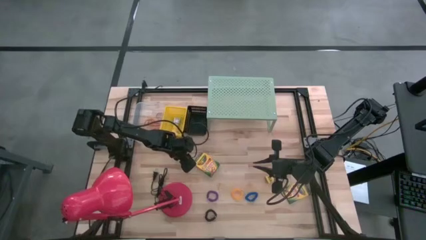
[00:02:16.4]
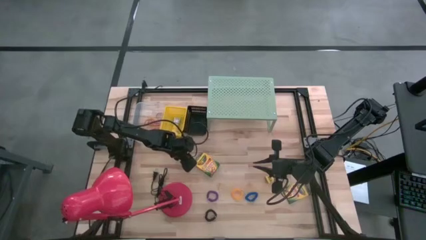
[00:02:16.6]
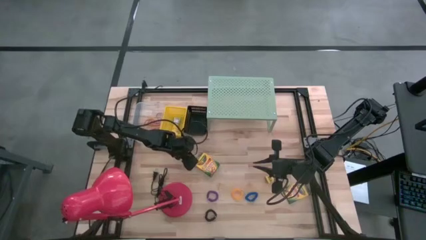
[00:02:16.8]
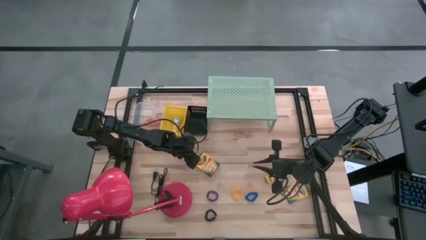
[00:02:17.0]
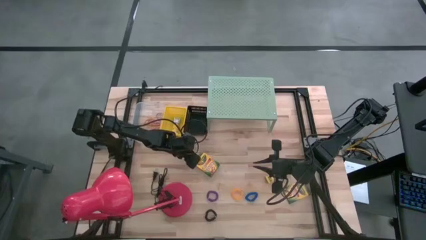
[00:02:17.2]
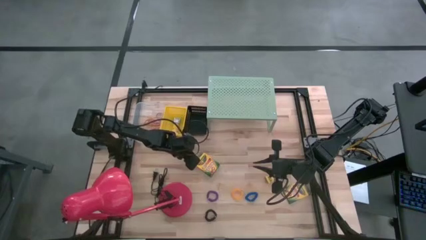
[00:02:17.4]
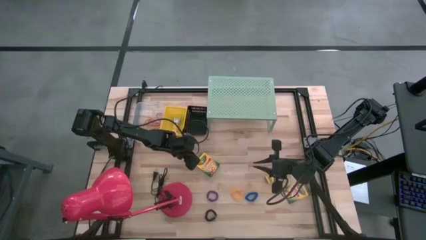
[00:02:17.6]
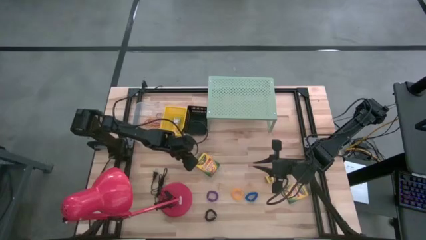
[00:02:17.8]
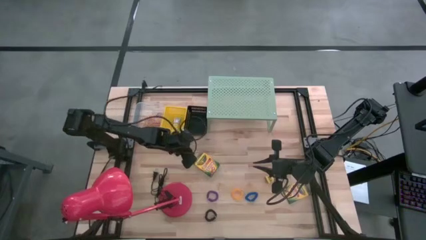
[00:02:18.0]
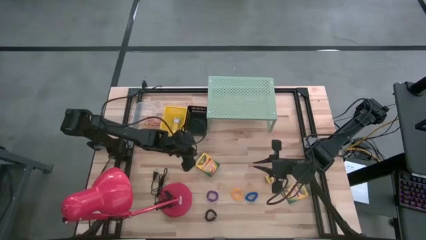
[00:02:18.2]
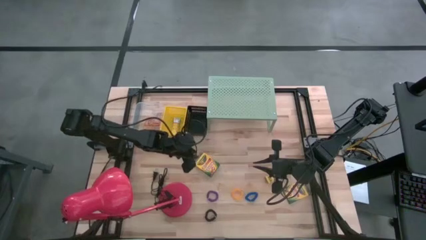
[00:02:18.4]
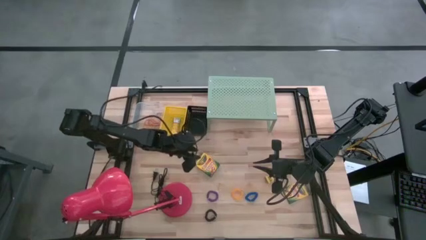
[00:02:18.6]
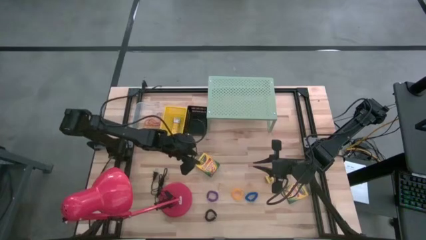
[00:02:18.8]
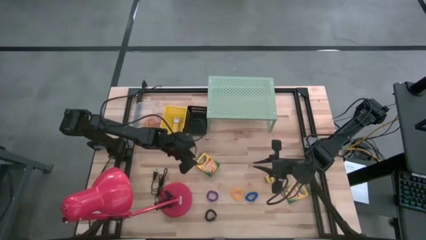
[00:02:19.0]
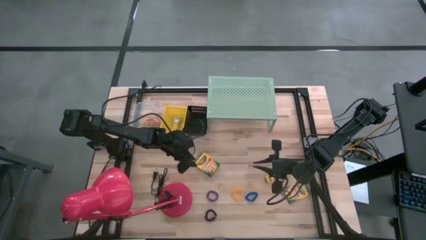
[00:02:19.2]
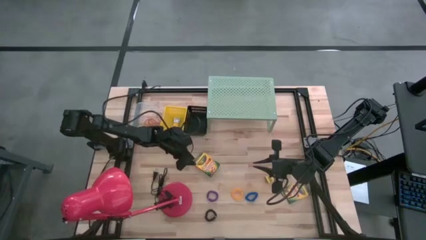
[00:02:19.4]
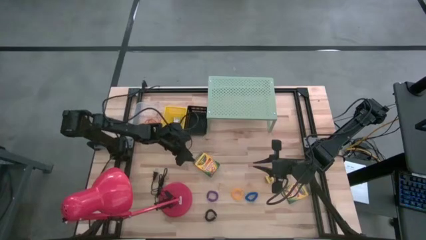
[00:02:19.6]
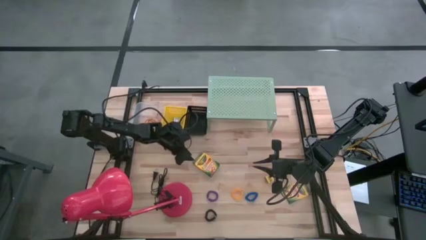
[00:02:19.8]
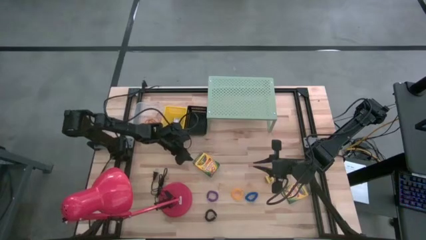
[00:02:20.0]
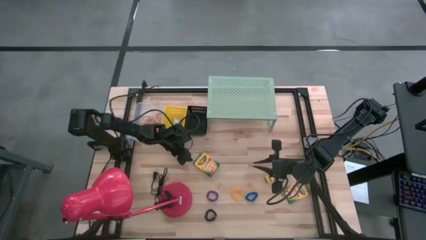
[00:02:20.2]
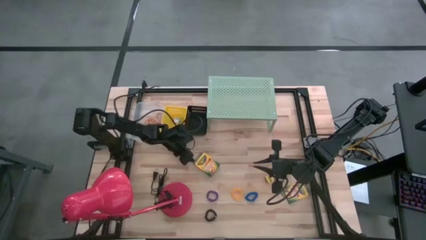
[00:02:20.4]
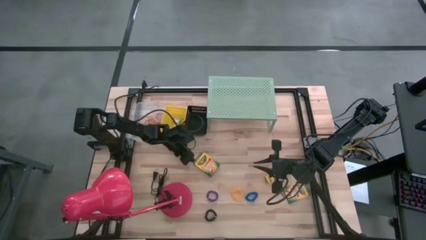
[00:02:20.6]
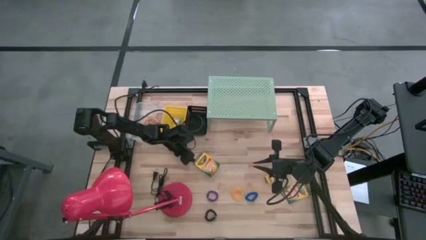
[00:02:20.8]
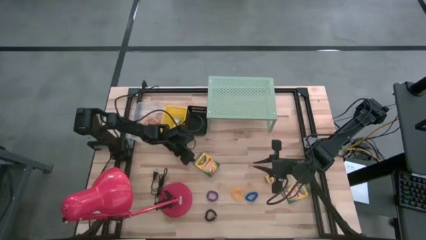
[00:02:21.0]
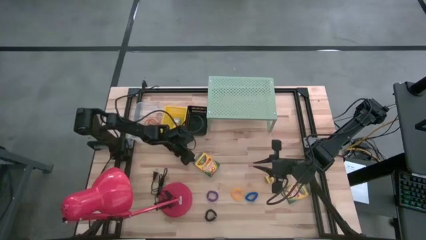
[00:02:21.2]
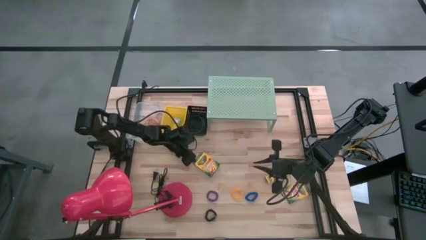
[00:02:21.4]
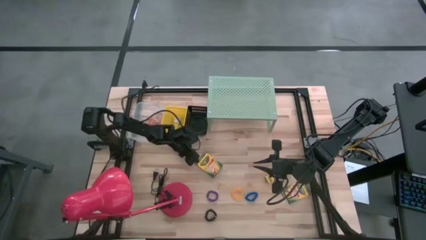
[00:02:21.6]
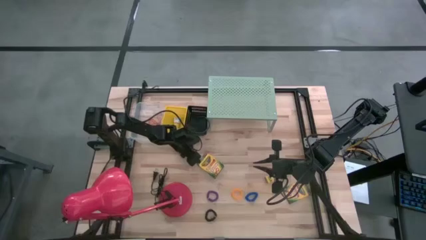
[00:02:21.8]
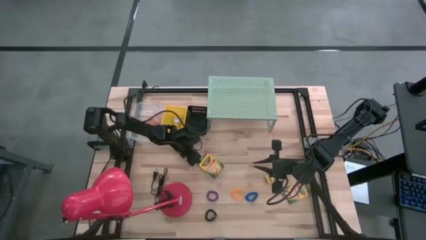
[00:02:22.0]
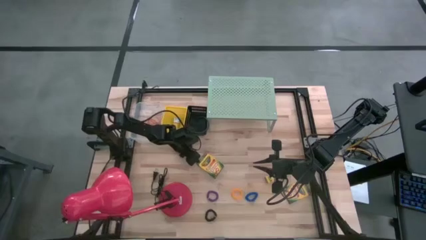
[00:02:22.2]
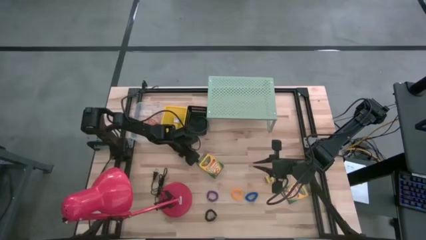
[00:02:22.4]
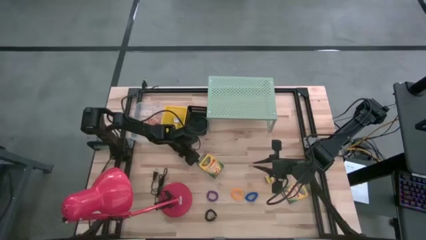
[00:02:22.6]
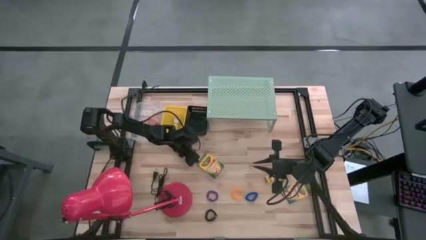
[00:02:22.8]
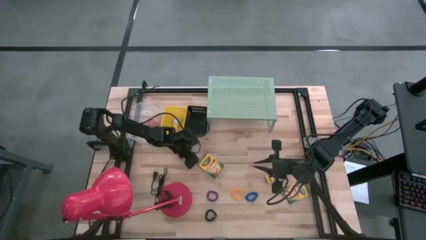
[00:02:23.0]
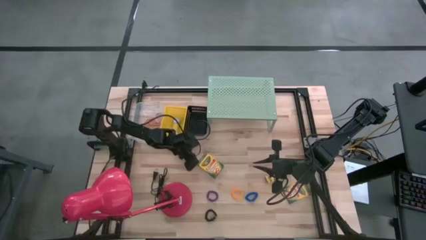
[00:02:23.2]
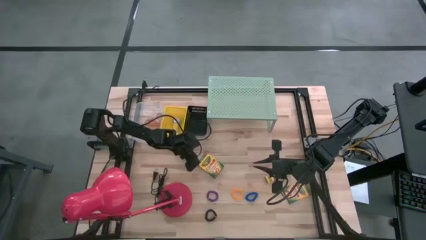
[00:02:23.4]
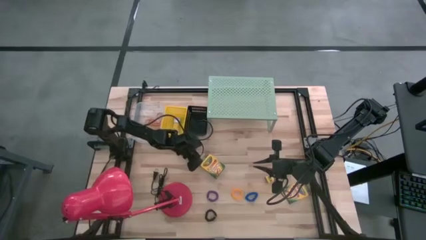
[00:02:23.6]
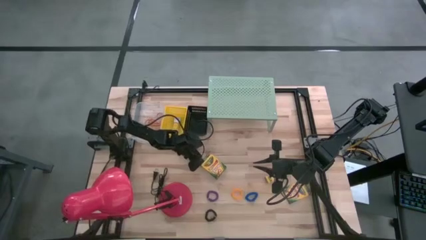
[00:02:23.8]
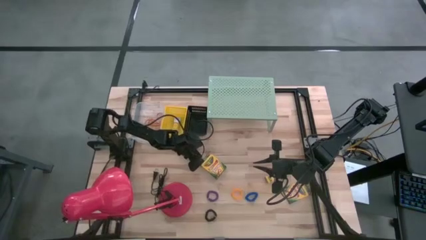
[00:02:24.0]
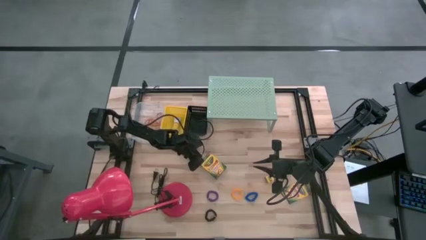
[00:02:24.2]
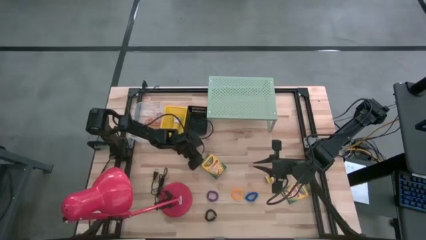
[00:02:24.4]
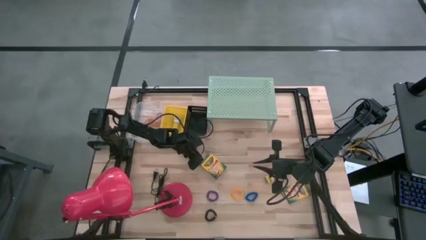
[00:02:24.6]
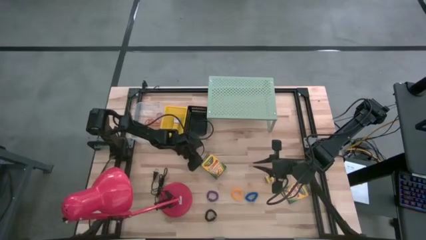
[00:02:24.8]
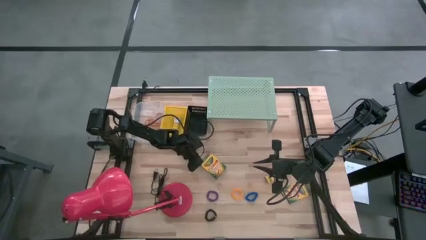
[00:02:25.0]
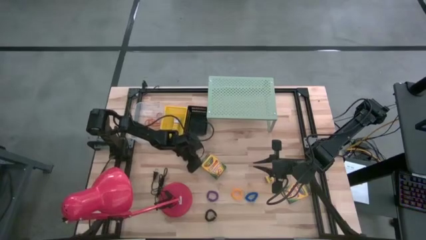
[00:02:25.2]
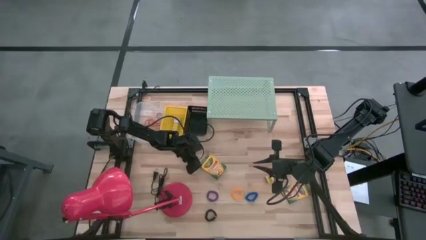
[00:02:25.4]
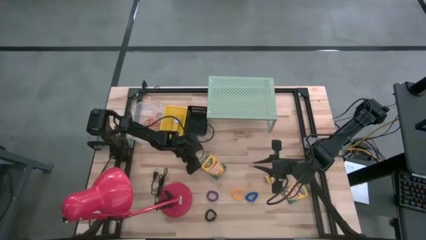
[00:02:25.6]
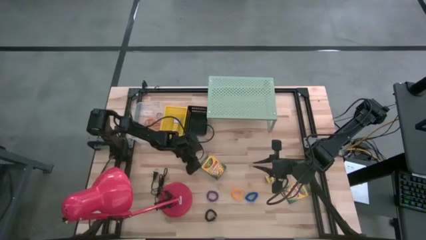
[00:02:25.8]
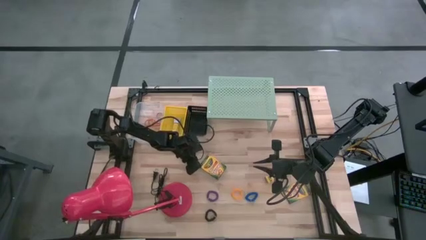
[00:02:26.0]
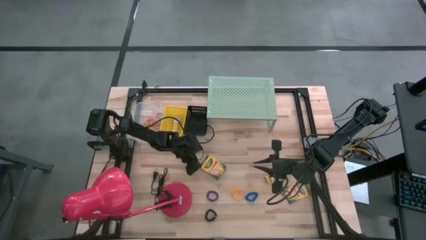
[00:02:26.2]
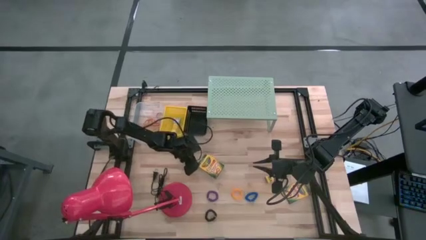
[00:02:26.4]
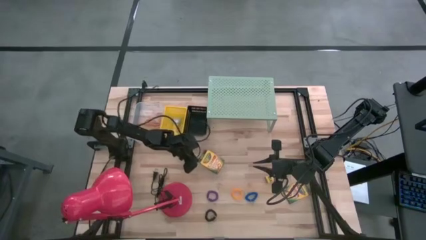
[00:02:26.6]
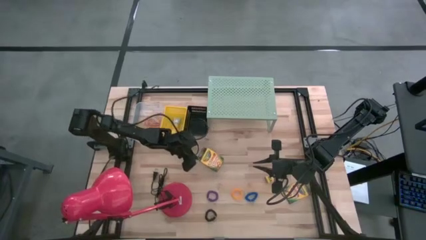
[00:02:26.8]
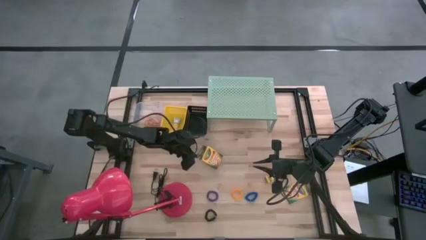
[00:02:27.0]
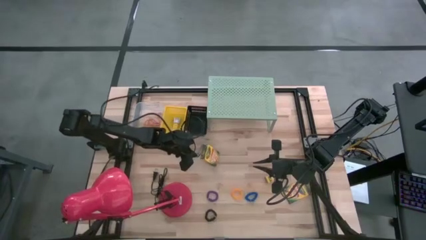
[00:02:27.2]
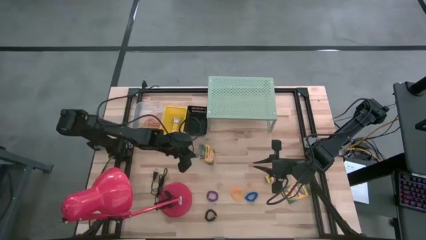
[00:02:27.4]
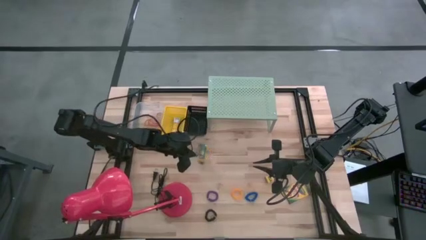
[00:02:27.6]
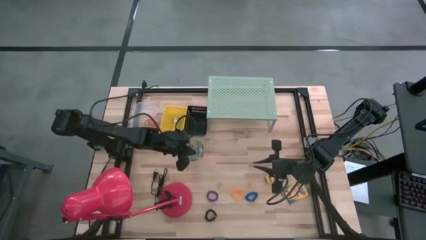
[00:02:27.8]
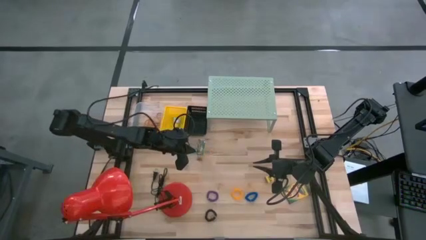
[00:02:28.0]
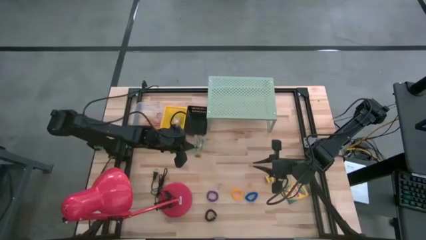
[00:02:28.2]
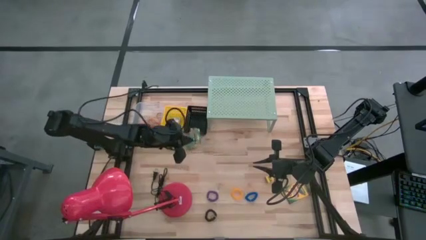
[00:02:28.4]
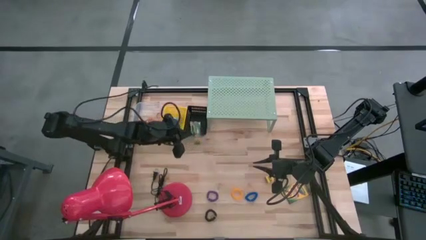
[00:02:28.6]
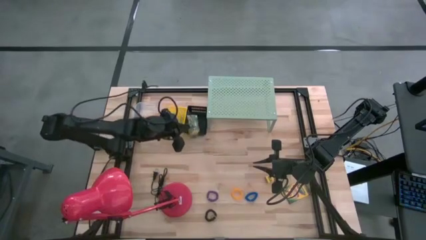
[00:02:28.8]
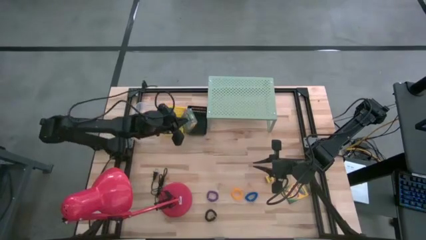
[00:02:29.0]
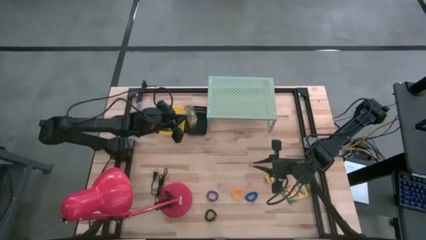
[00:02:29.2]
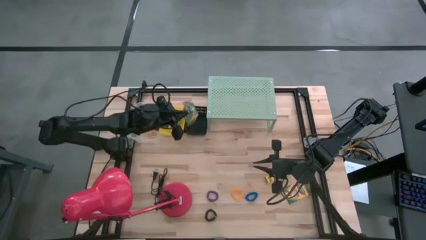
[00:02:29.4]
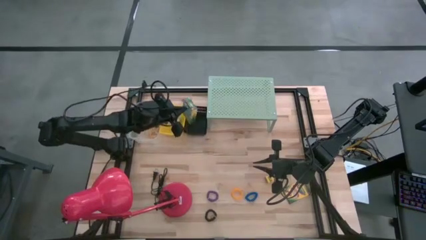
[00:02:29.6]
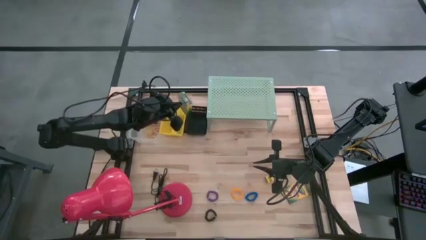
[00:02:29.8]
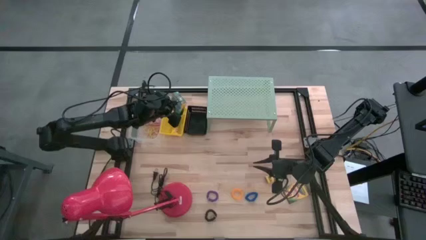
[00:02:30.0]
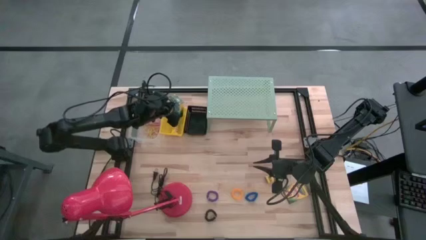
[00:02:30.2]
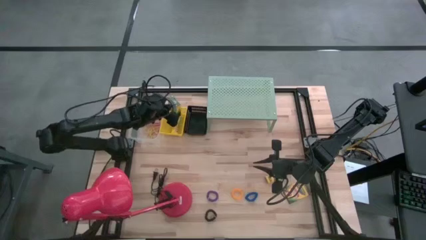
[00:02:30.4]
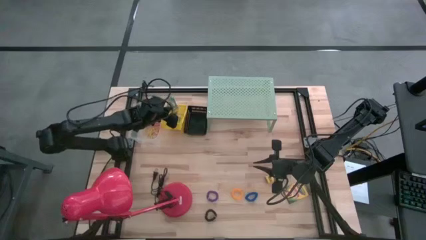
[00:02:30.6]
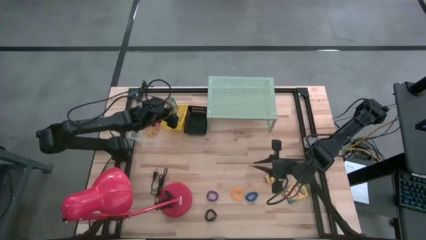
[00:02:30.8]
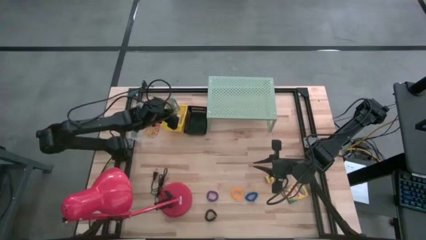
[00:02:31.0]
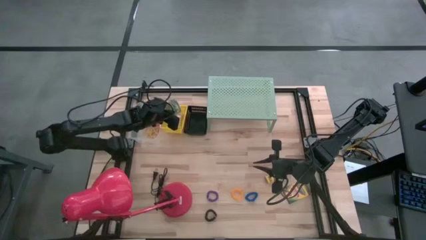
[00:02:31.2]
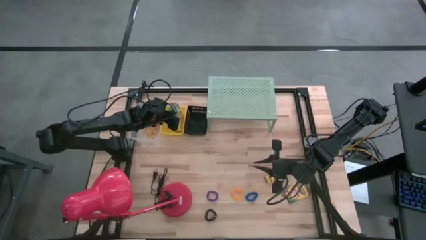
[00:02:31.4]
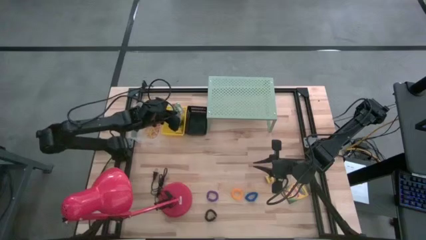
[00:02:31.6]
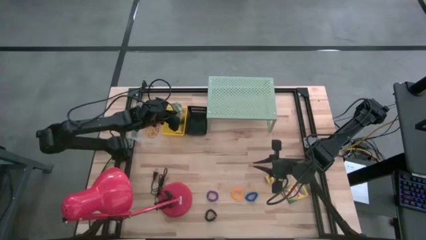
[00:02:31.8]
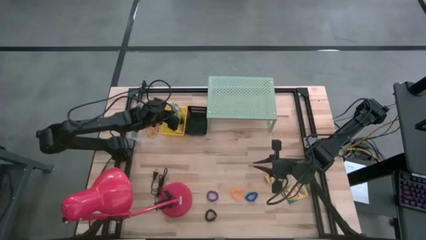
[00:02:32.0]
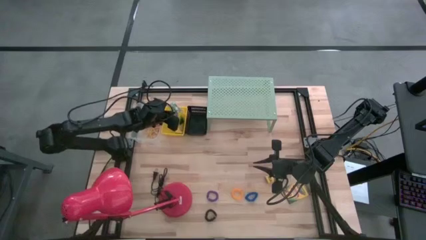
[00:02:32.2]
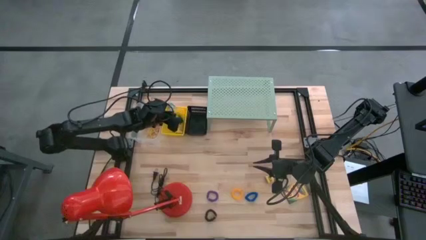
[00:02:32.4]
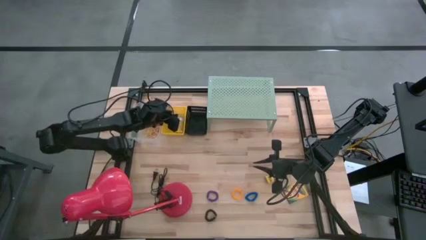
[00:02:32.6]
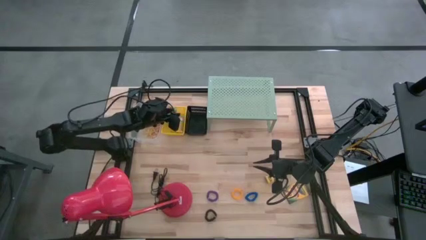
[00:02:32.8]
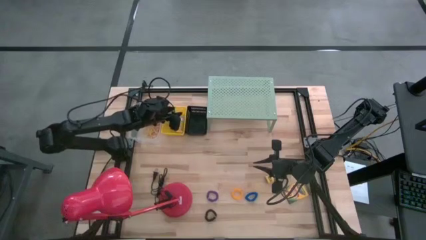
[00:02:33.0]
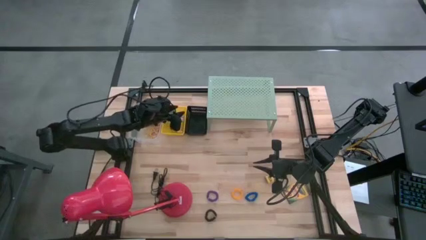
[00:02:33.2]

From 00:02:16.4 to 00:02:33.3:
Task: Pick & Place Office Desk Supplies
Put the crayon into the yellow bin
